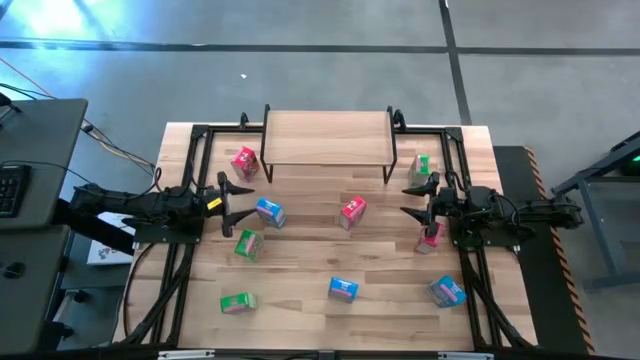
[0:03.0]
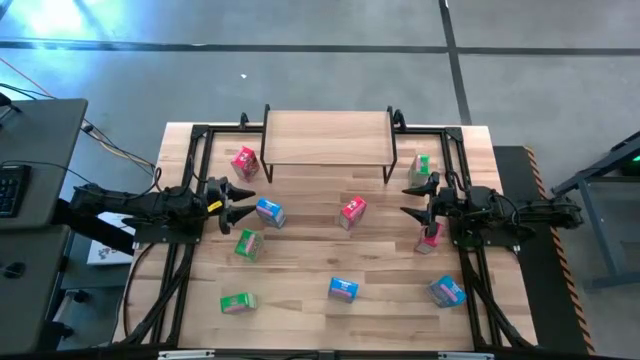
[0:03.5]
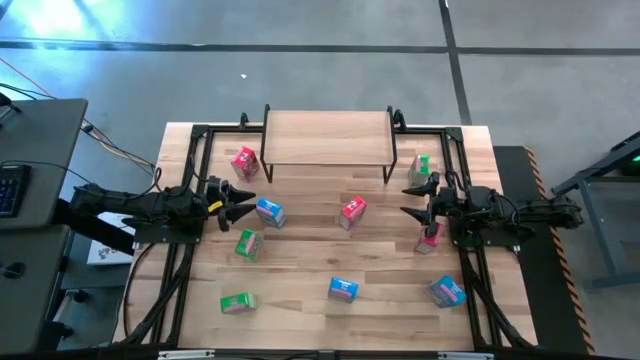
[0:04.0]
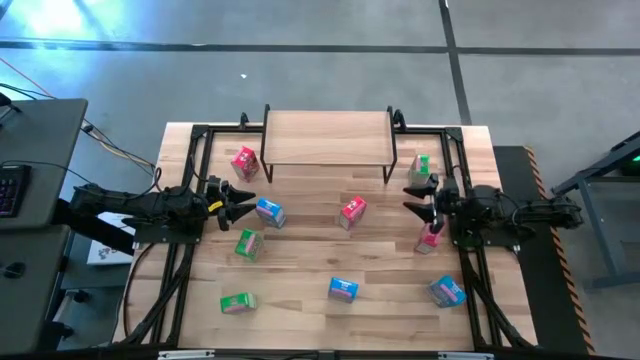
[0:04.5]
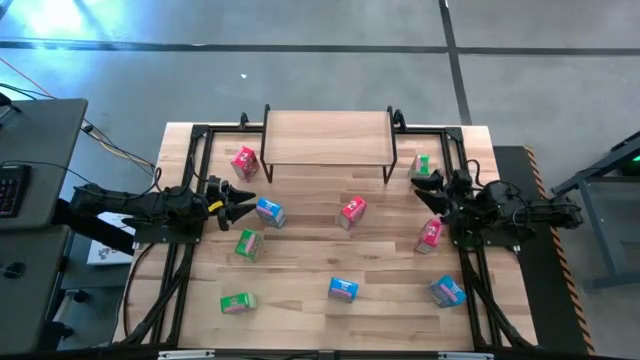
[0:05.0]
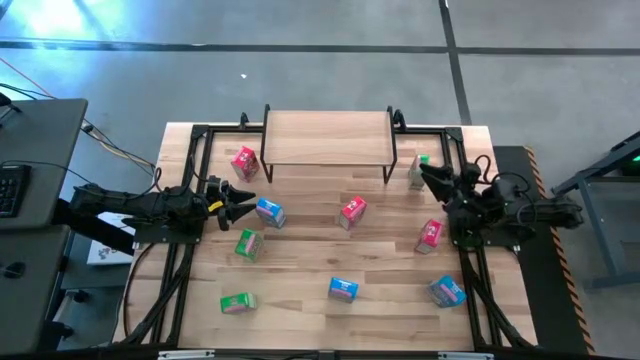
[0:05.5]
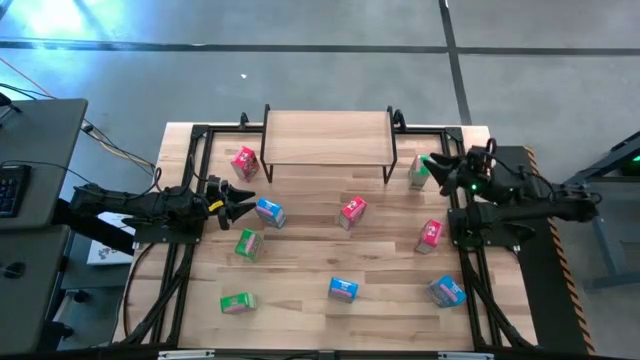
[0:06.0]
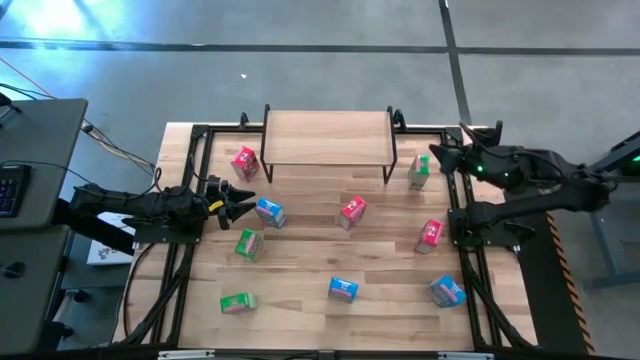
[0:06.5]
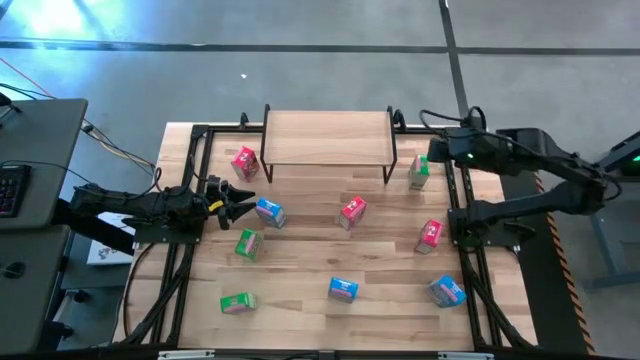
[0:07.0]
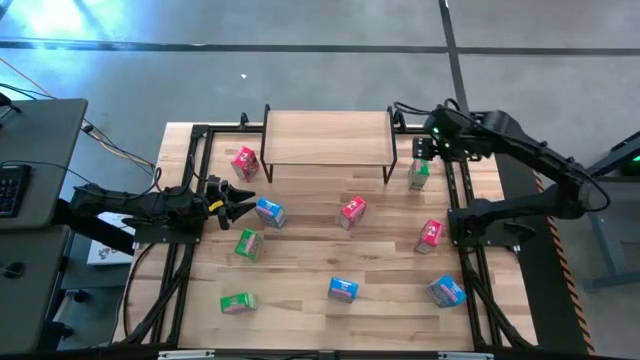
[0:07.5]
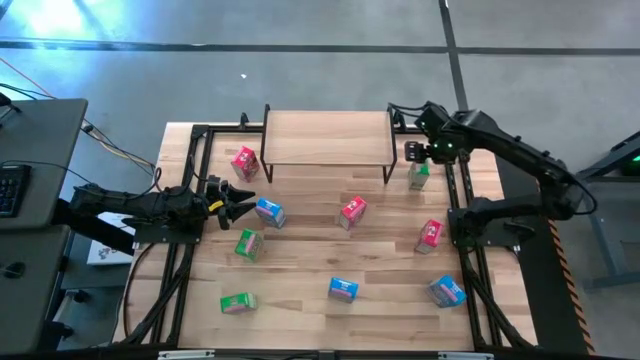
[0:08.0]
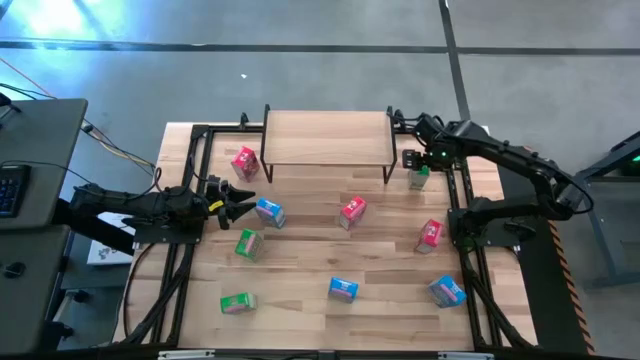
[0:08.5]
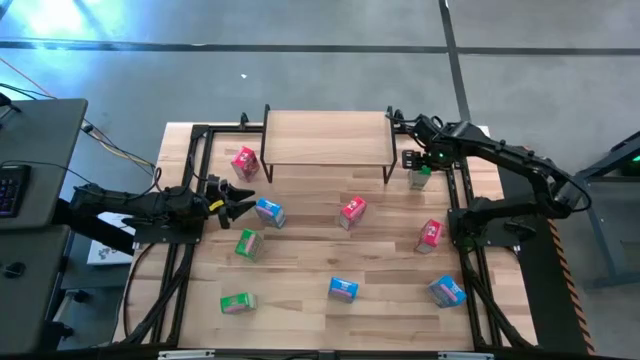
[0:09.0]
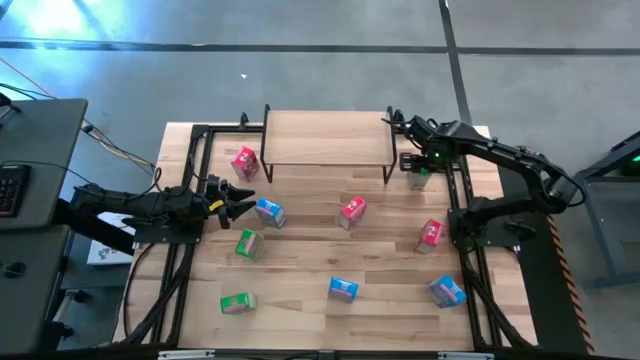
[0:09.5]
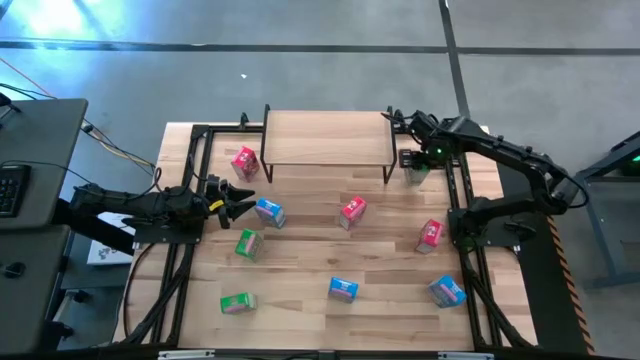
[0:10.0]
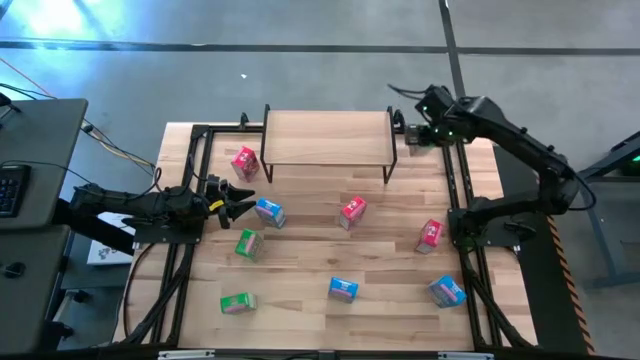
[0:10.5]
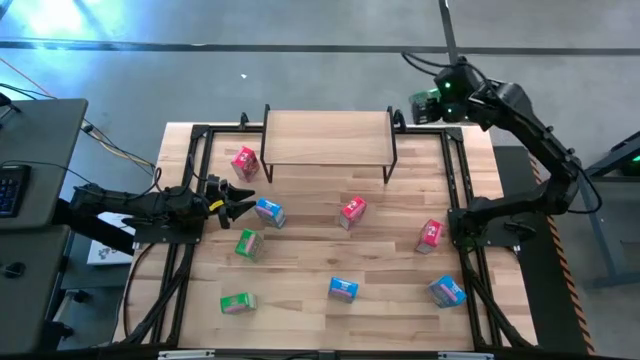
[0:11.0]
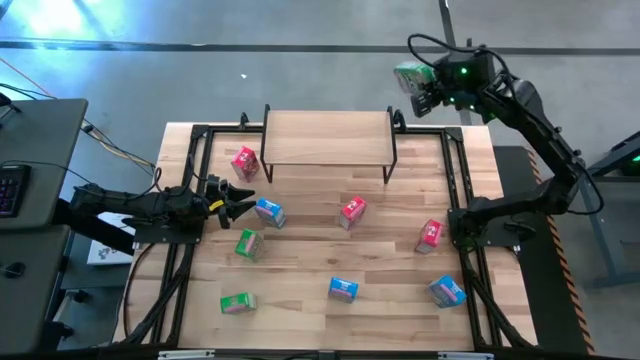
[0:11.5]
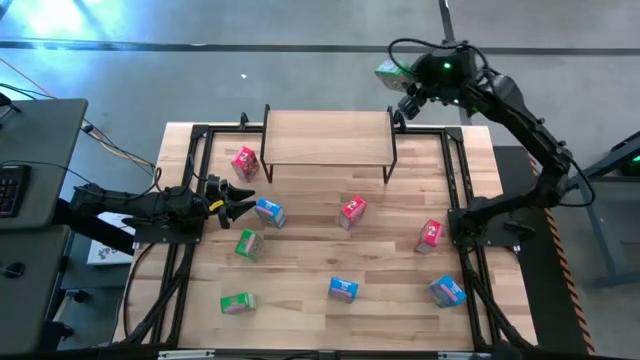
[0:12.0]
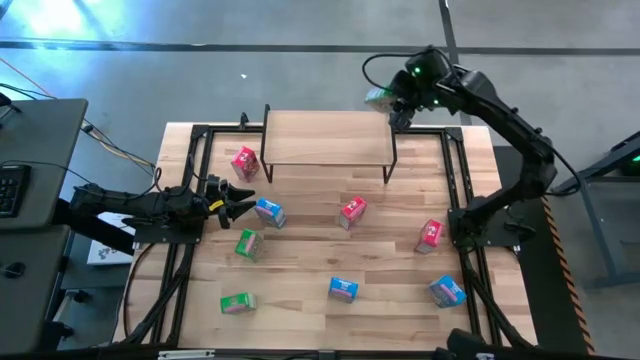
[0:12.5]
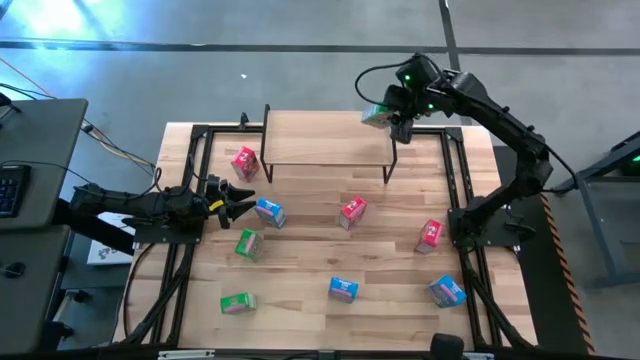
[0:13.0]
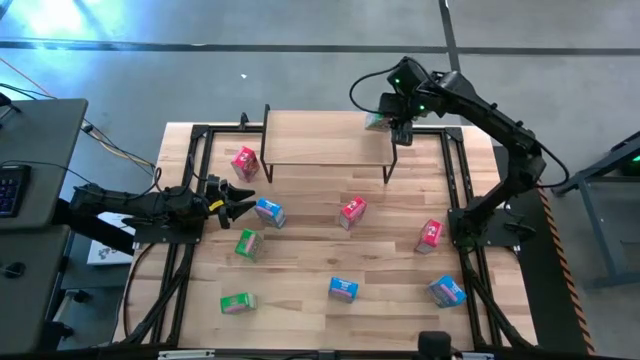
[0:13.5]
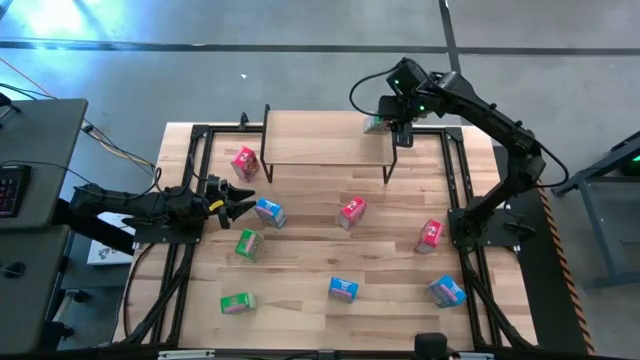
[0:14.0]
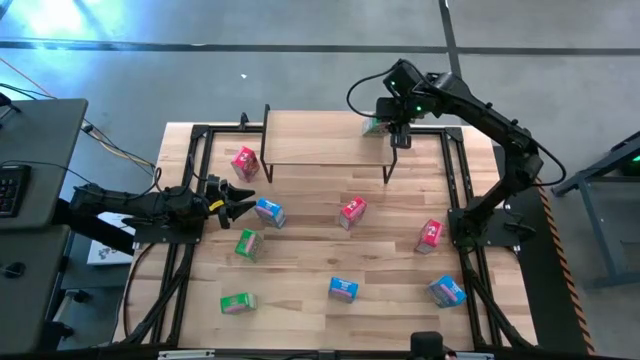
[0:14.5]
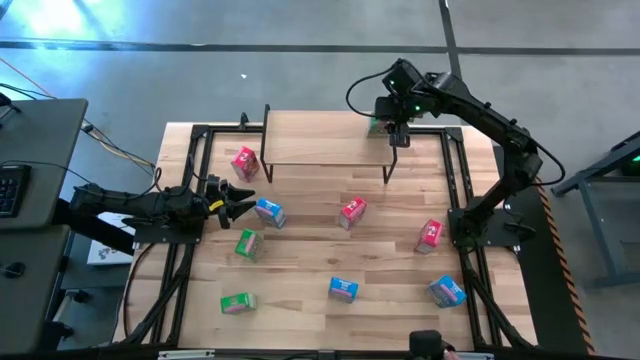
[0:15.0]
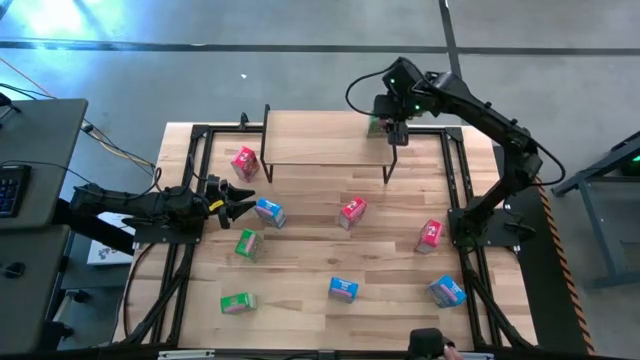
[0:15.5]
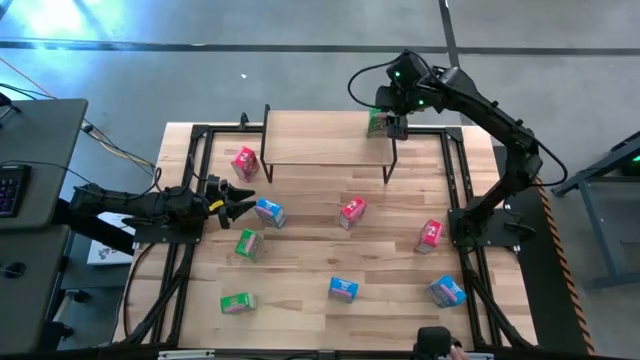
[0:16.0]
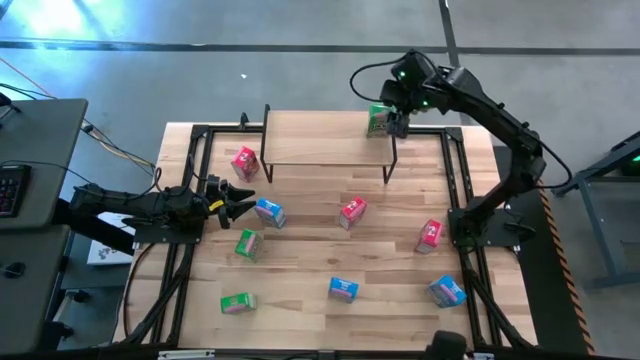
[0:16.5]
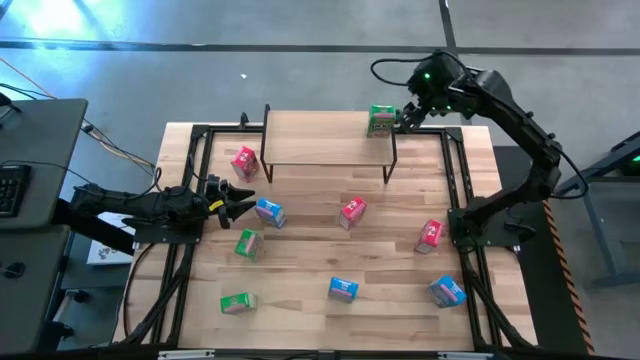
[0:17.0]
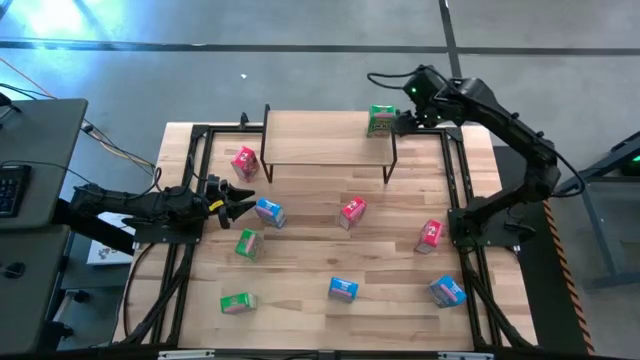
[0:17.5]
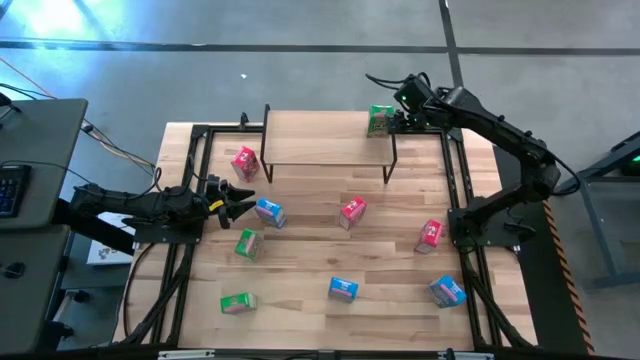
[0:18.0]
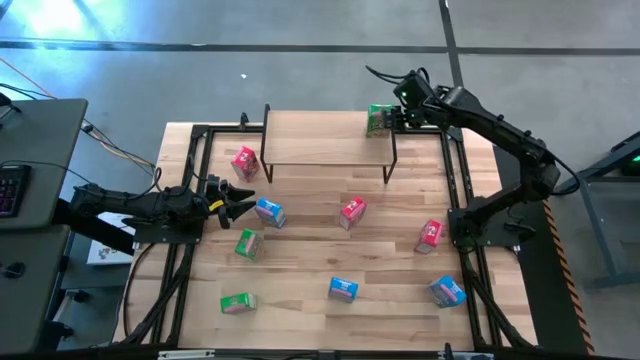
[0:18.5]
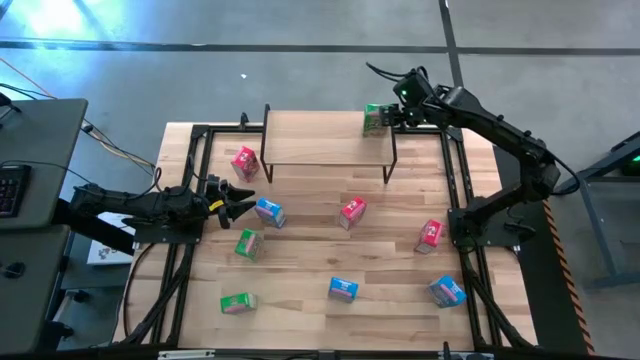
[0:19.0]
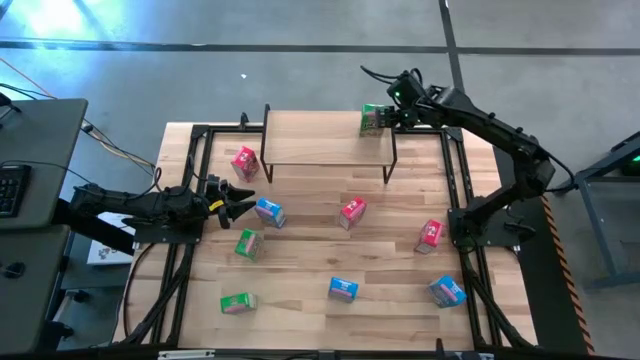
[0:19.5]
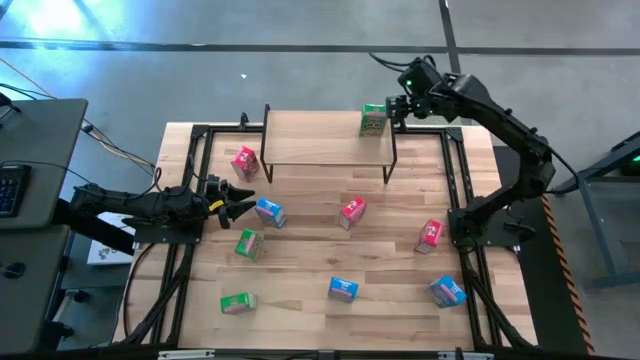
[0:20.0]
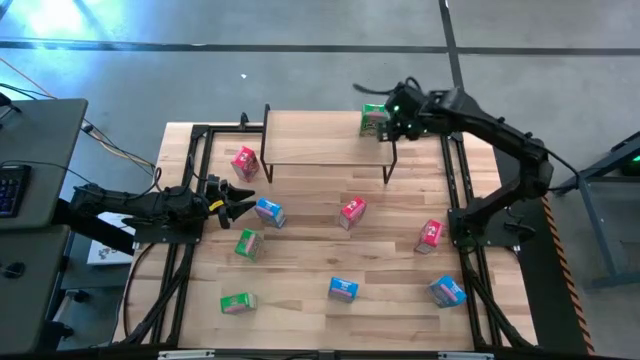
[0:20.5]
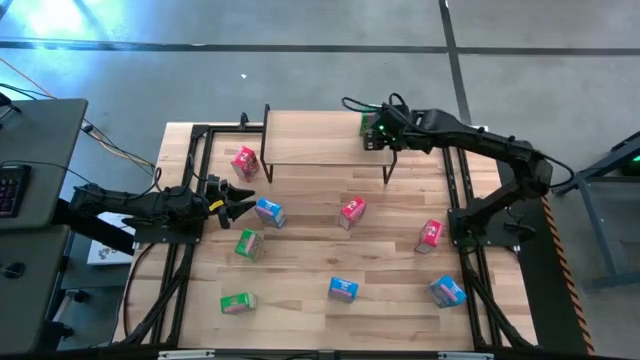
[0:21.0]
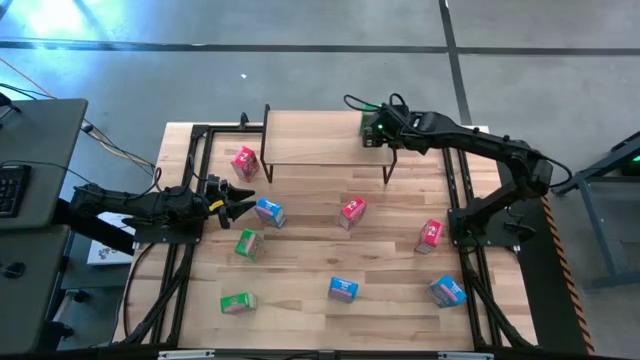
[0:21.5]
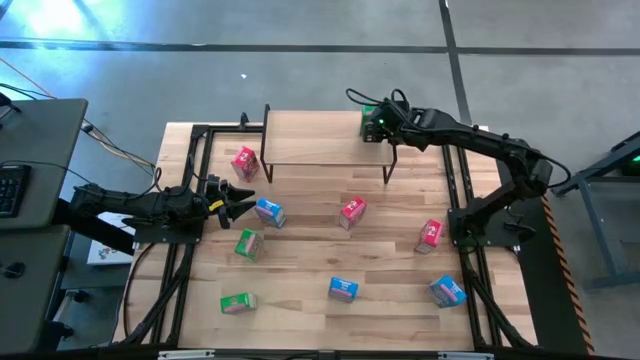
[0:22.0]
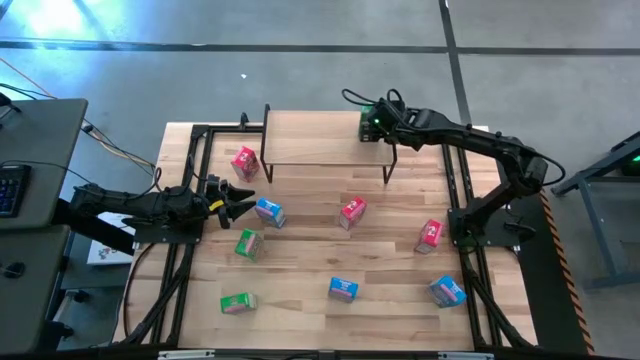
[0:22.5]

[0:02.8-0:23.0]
Task: Stack cereal on shelf
Put the right green cereal box on the shelf
